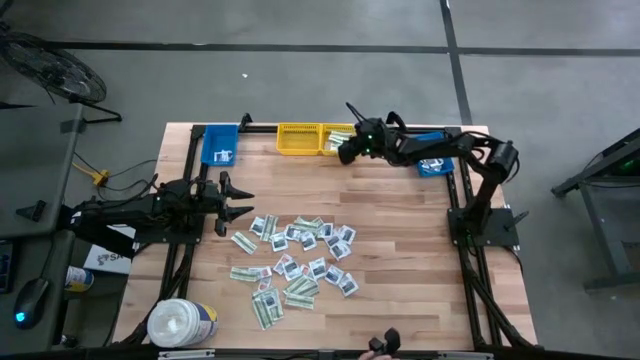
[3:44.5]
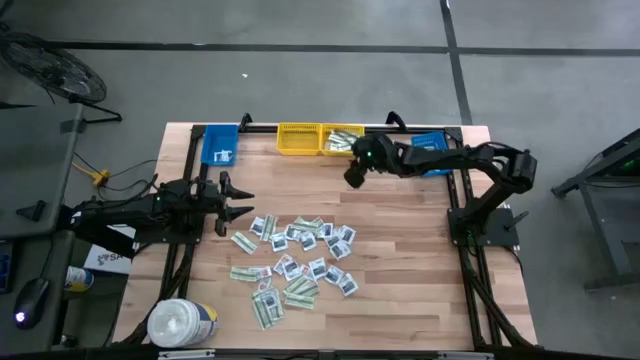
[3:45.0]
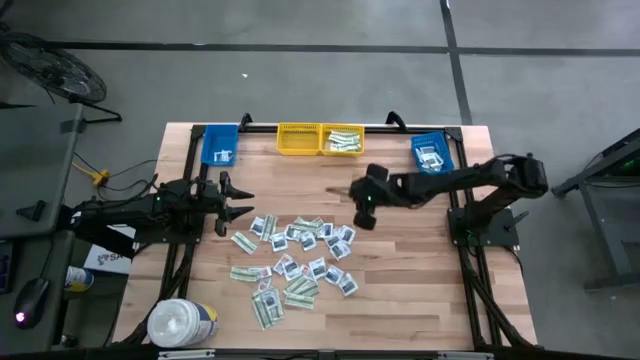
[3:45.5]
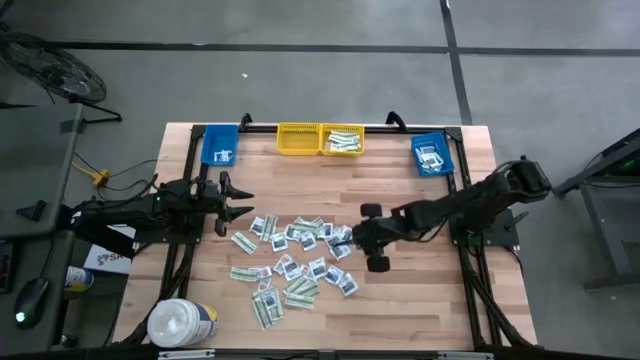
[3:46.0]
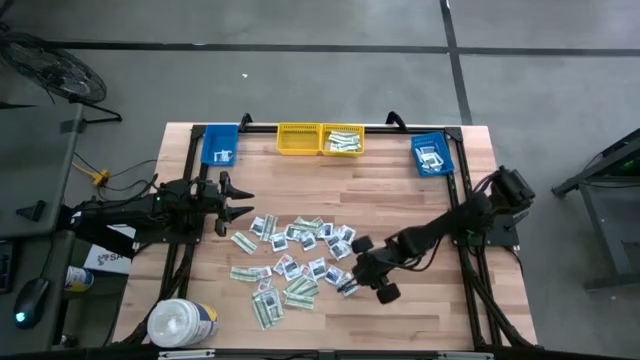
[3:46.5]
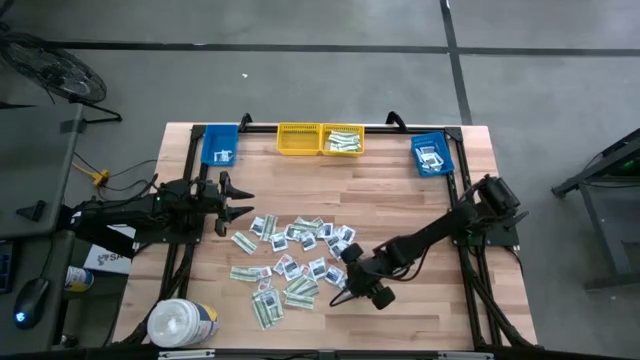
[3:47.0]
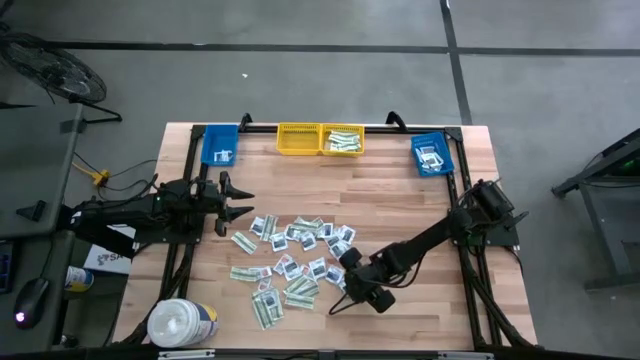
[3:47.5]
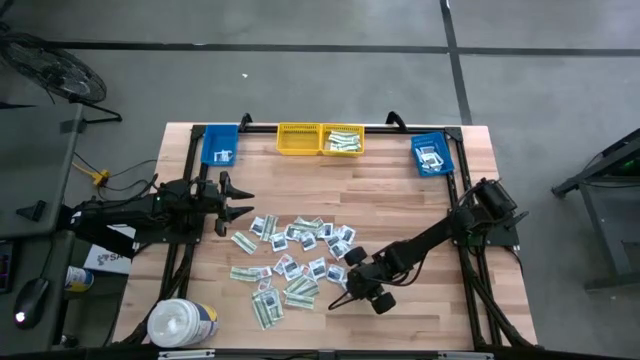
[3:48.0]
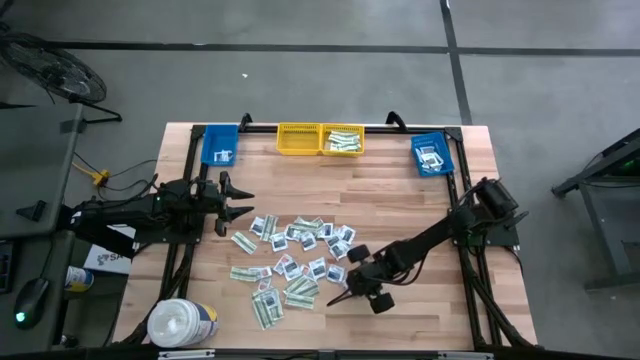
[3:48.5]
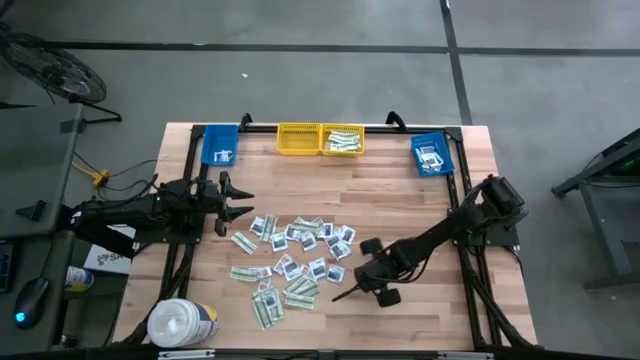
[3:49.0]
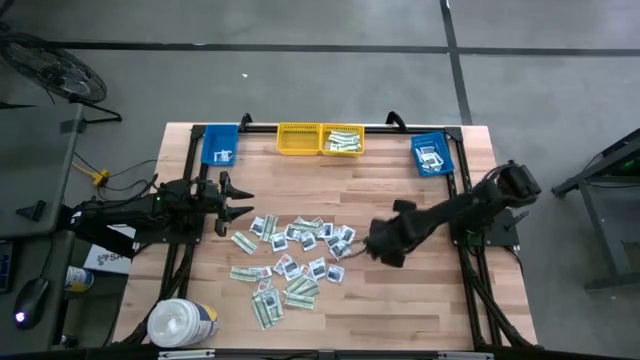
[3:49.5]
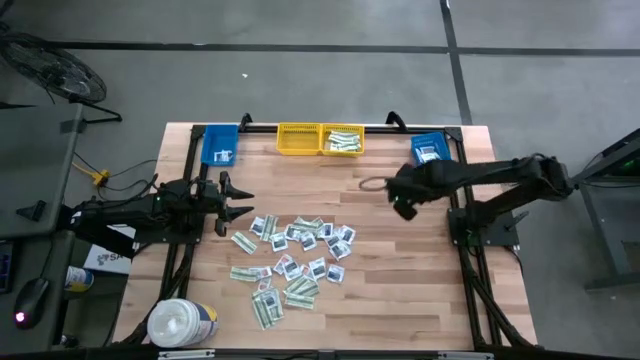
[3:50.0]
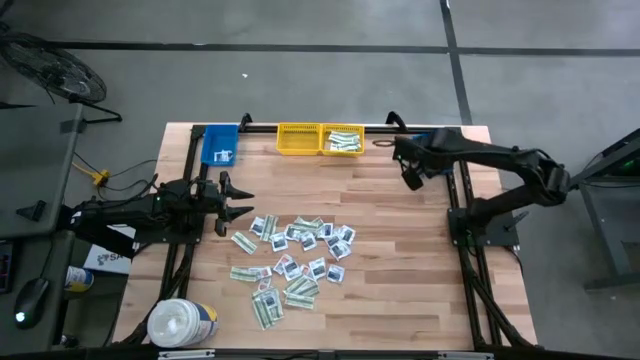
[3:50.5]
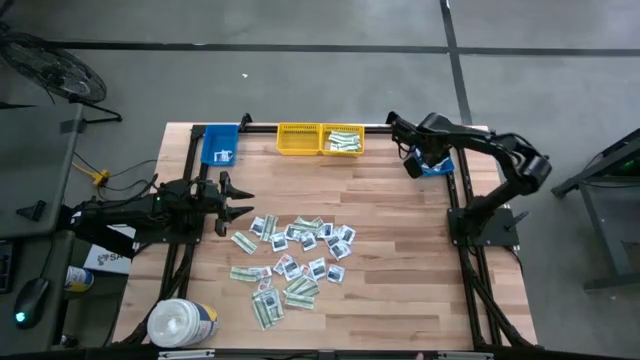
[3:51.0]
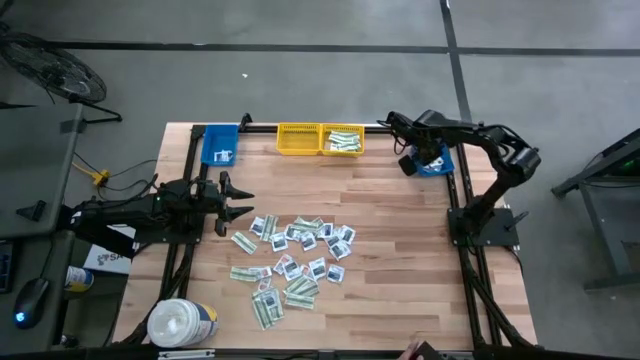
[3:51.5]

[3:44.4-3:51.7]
Task: Pick & Place First Aid Supplies
Put the black towelette pack into the right blue bin

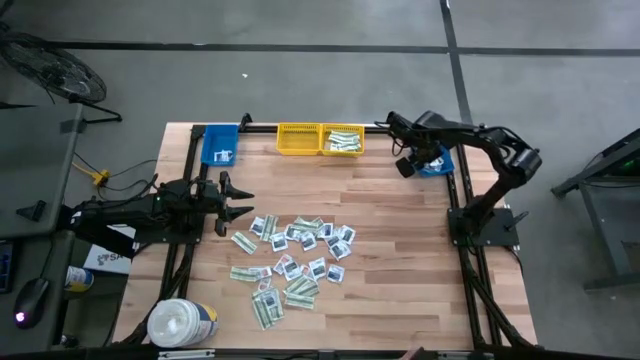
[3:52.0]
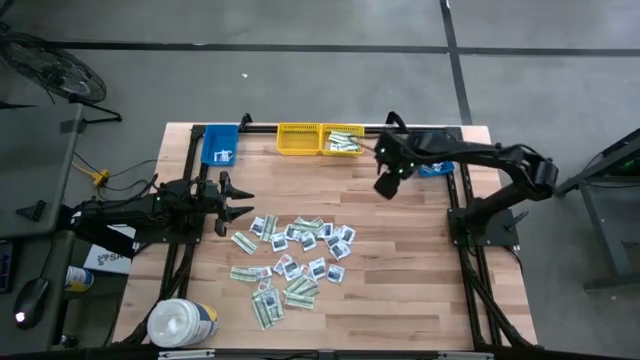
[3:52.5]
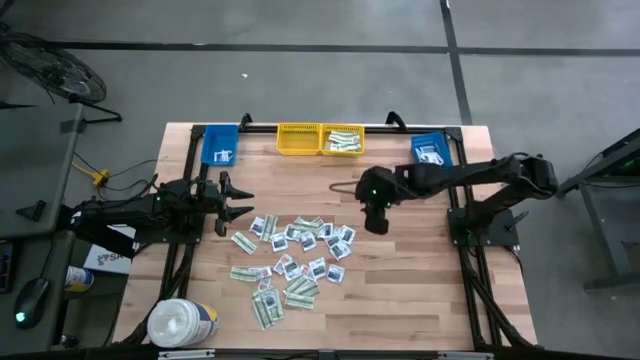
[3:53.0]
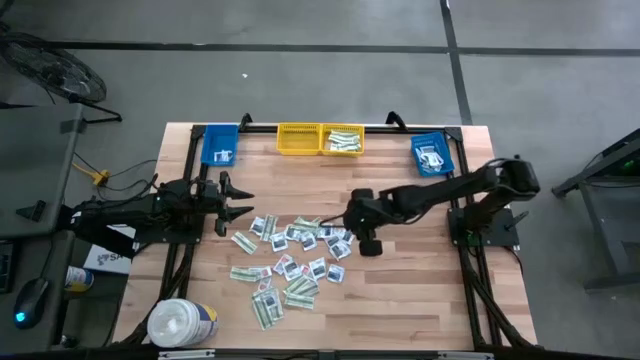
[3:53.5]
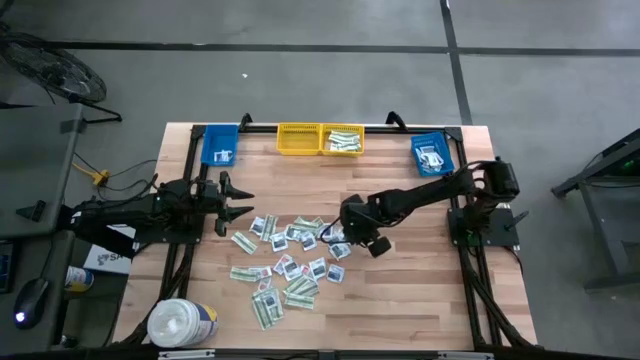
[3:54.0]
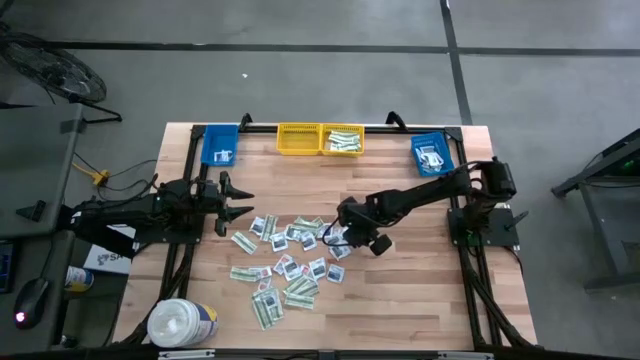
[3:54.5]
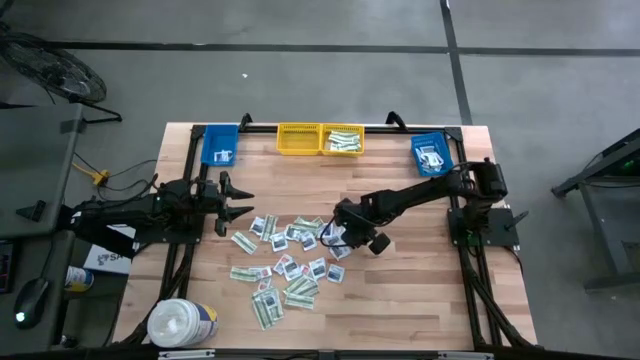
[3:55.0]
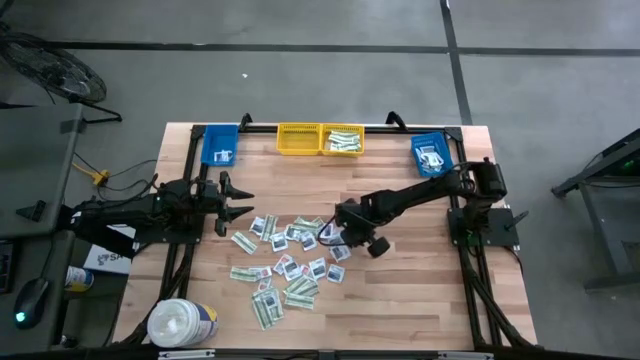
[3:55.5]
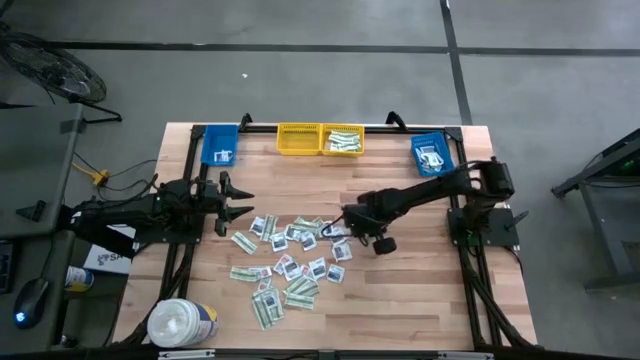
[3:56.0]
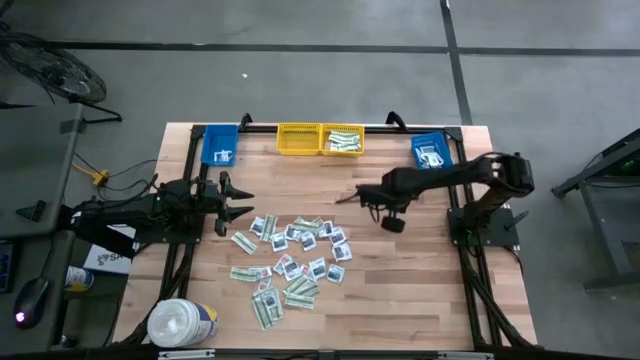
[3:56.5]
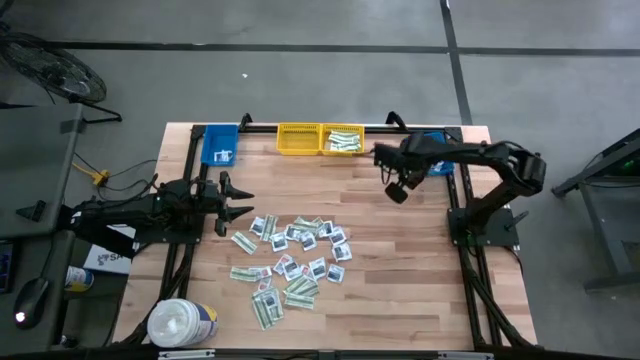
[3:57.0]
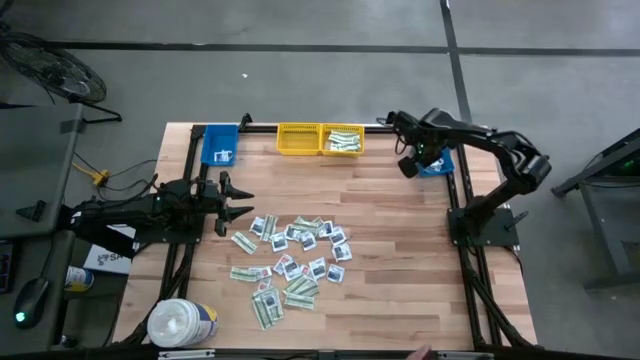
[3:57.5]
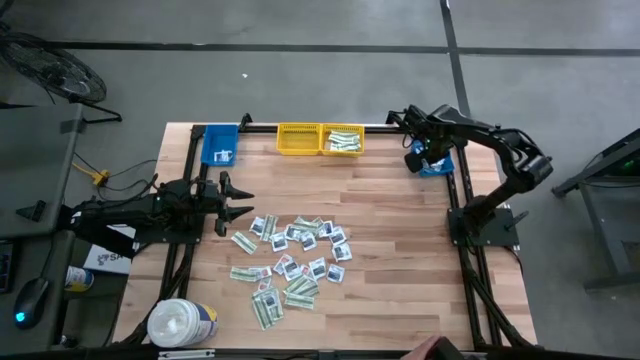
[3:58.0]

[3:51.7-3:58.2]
Put the black towelette pack into the right blue bin

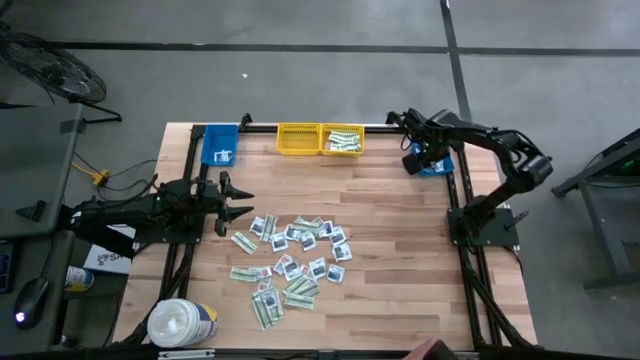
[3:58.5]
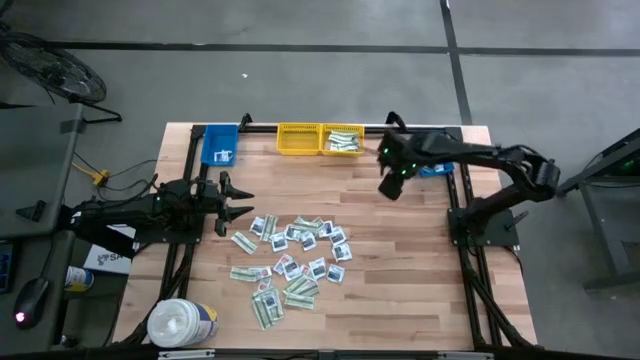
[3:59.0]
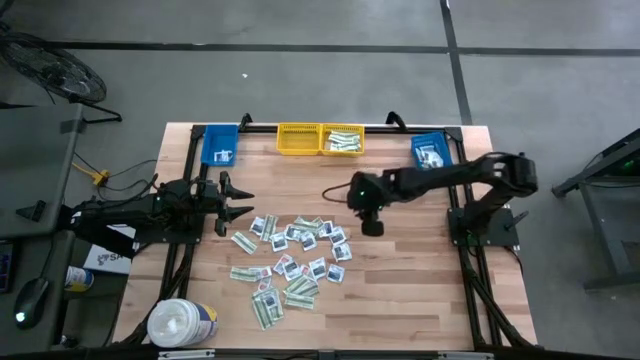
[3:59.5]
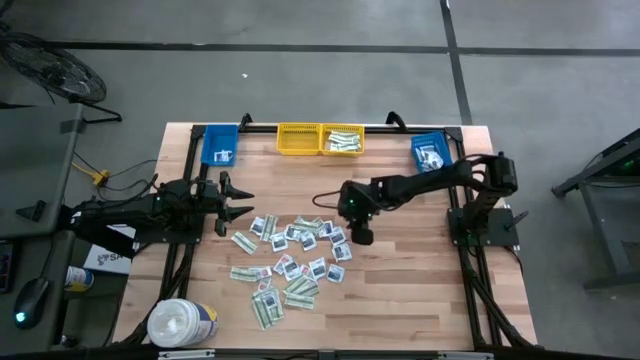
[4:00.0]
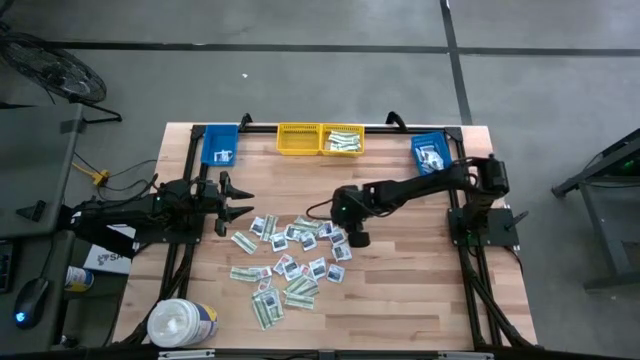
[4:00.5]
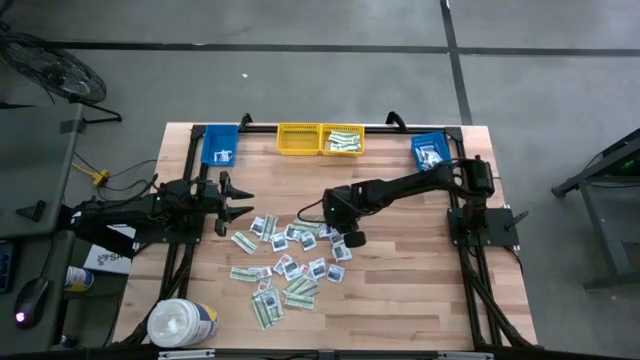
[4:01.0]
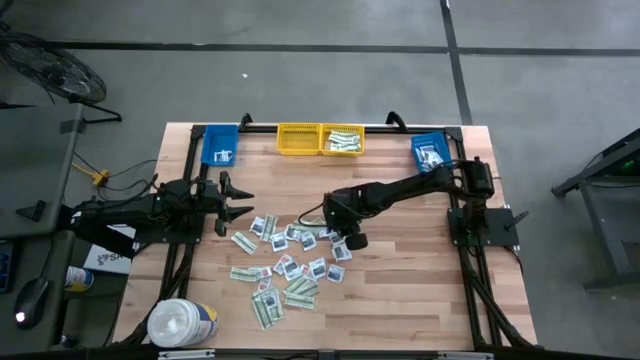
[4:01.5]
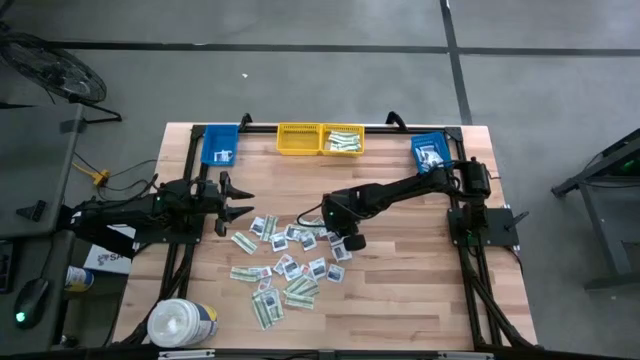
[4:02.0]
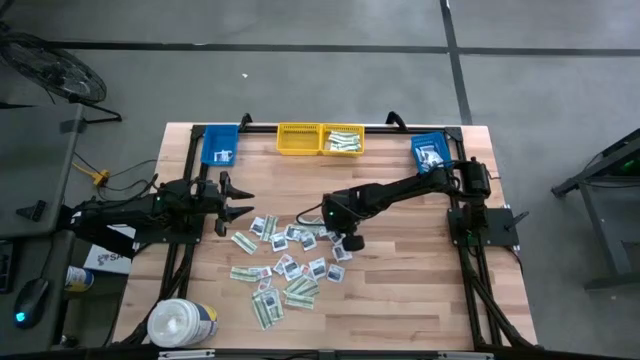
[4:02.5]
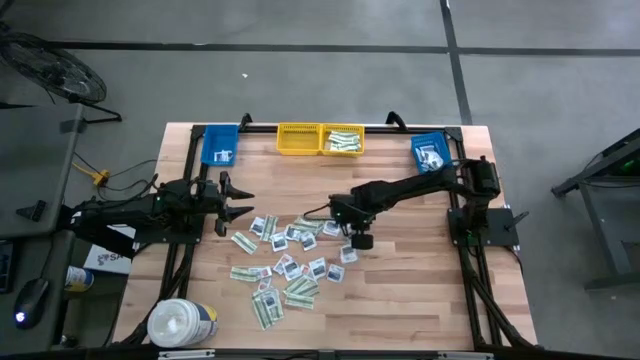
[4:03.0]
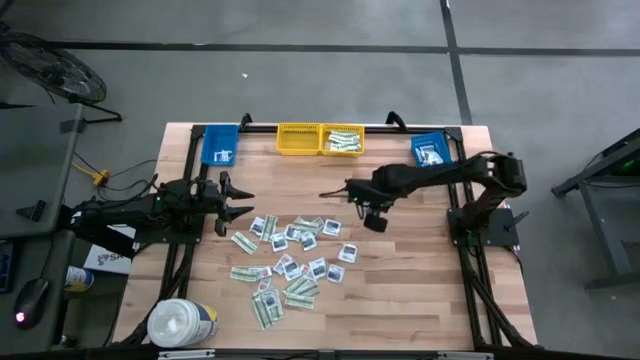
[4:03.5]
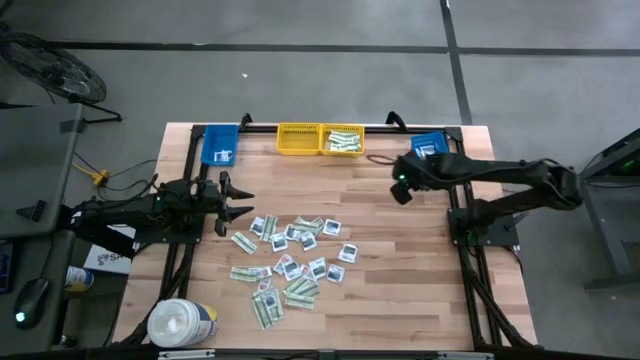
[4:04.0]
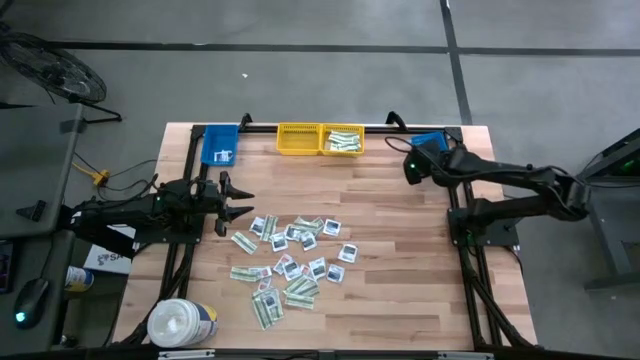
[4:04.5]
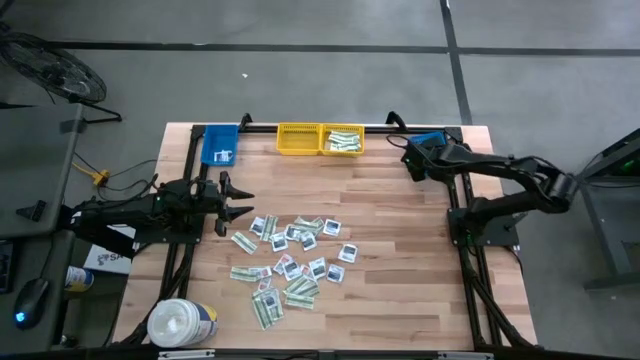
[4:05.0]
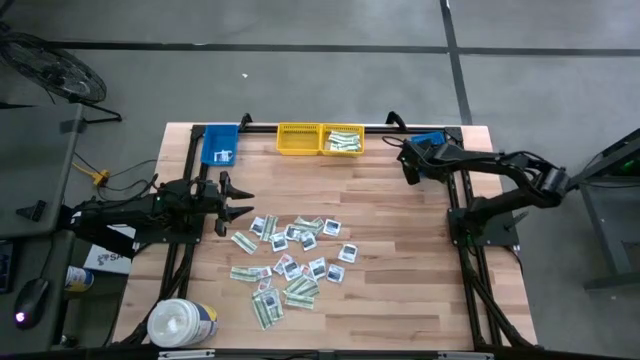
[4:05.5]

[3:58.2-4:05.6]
Put the black towelette pack into the right blue bin
